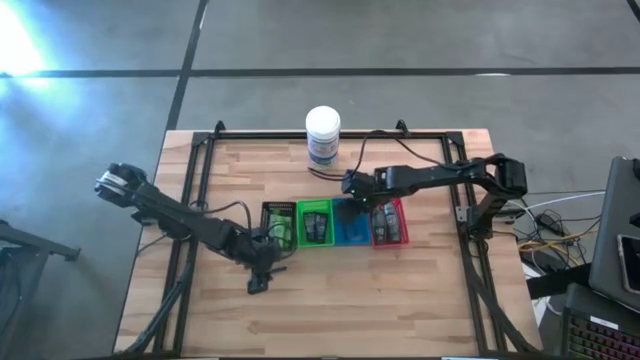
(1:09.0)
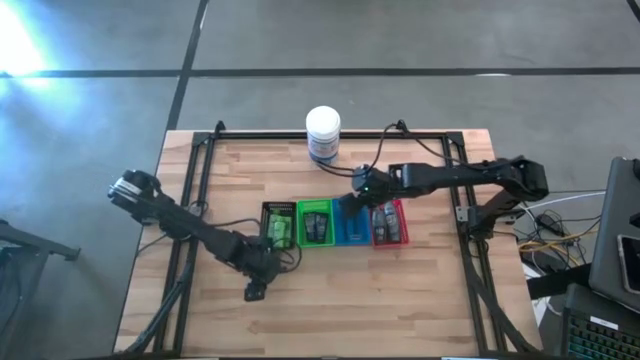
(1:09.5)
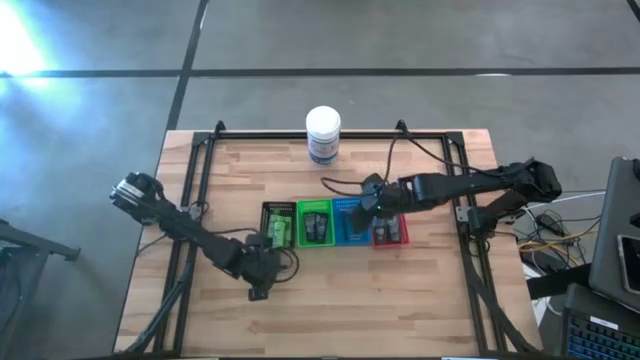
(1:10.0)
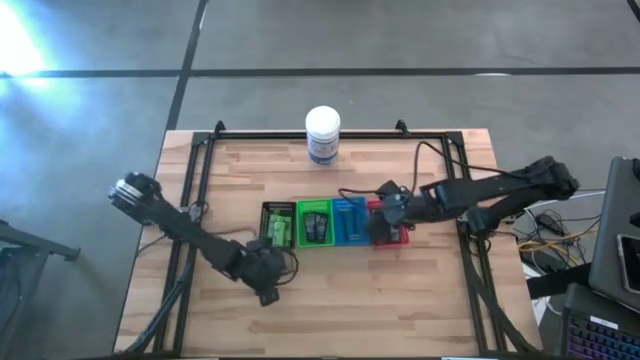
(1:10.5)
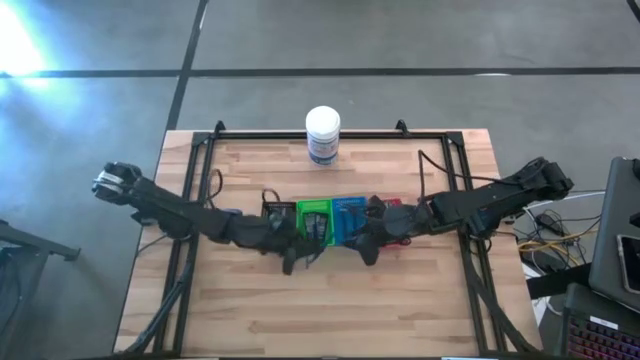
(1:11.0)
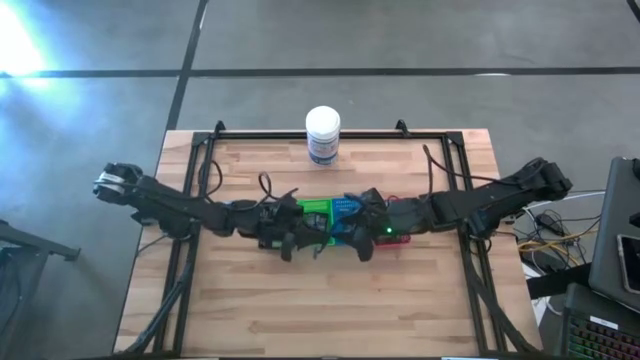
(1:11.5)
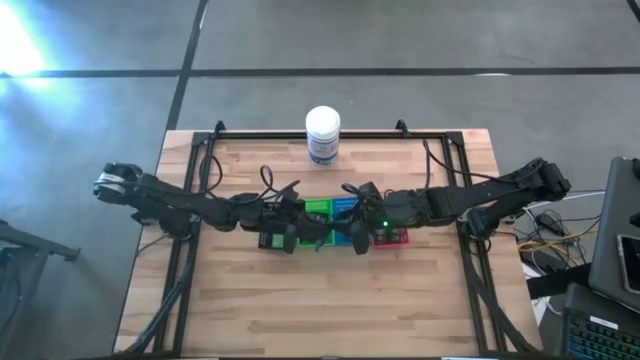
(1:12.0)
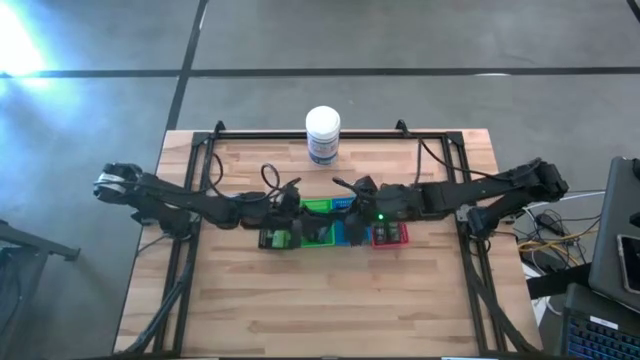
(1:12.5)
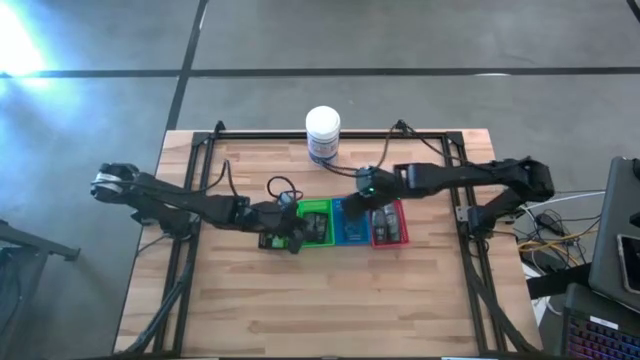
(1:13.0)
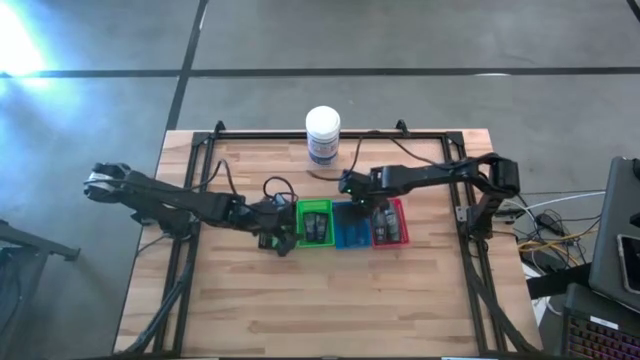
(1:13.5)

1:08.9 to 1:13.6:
Task: Pick & Place Travel size toiletries
Put the blue razor into the blue bin

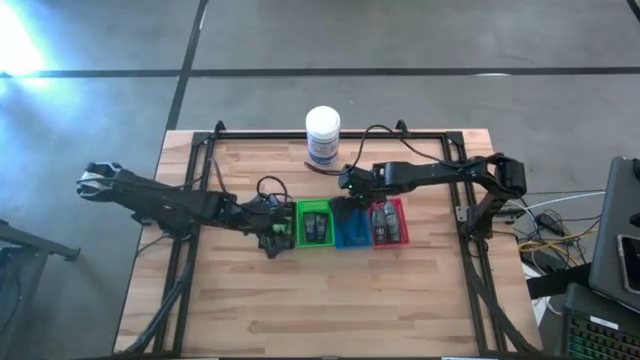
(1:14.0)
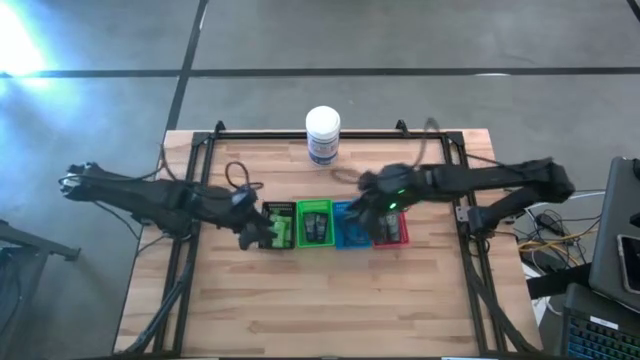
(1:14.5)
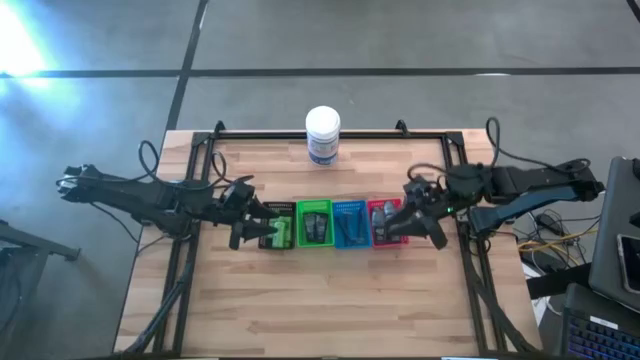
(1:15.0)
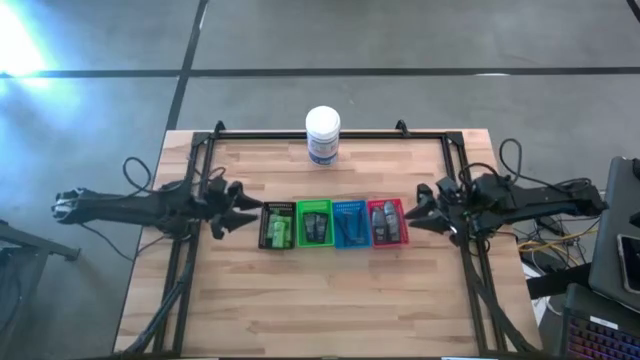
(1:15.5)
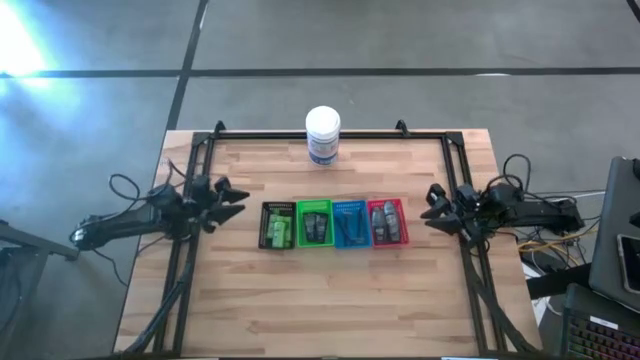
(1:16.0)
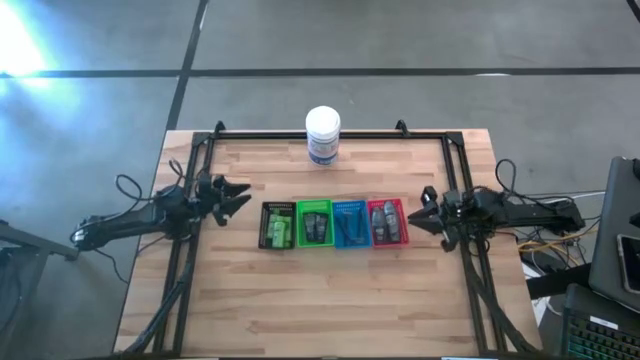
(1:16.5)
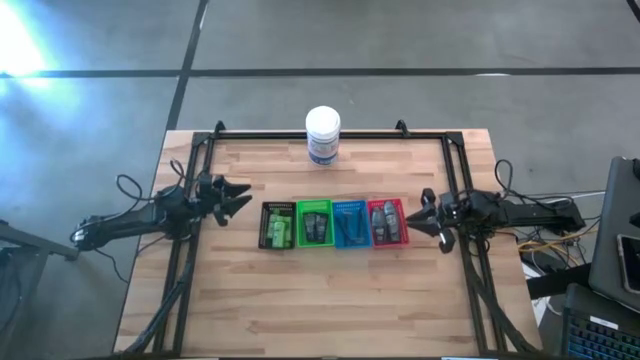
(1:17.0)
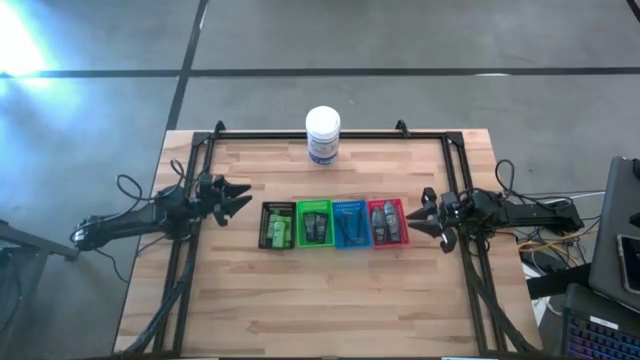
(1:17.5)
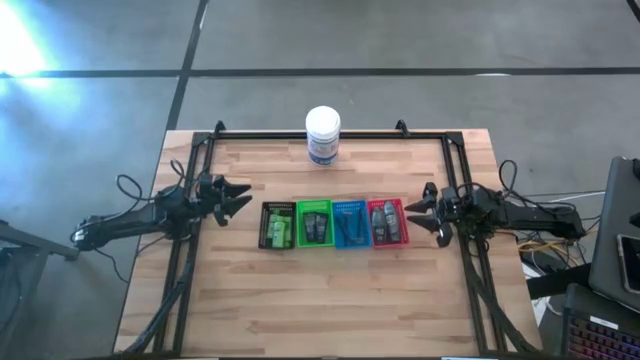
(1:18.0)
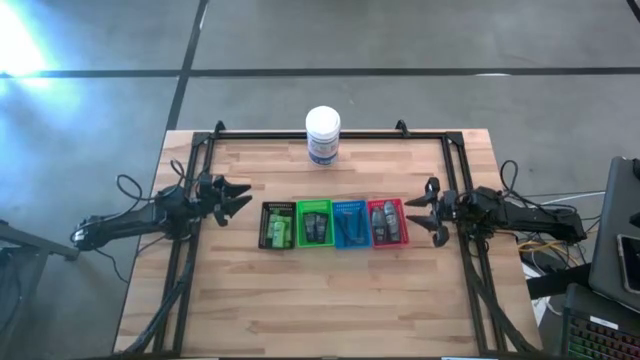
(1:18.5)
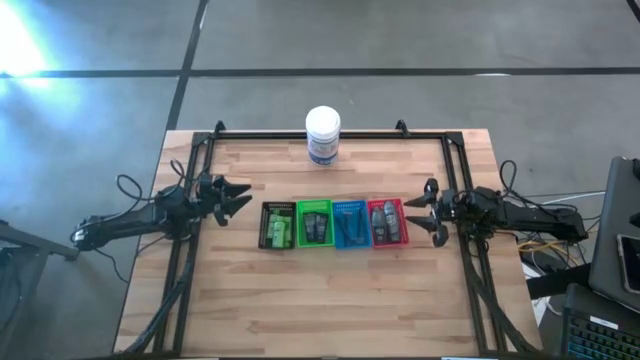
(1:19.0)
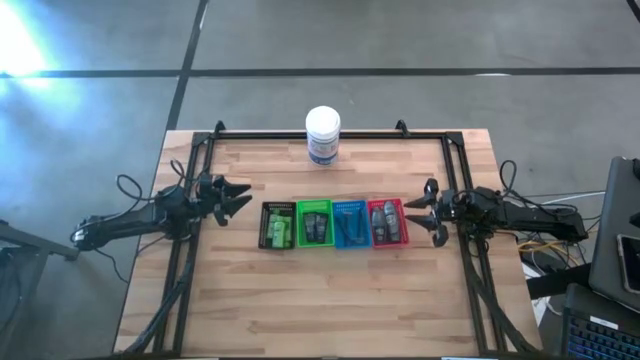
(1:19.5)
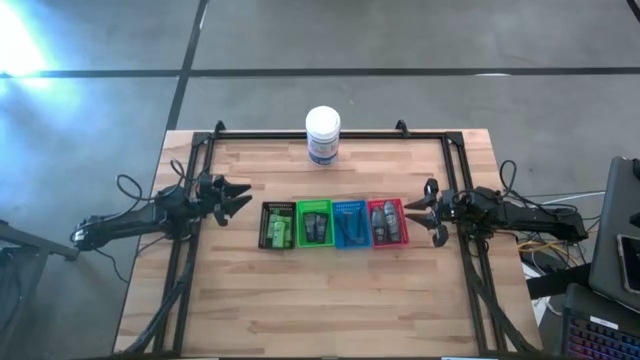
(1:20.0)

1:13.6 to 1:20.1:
Return to Home Position

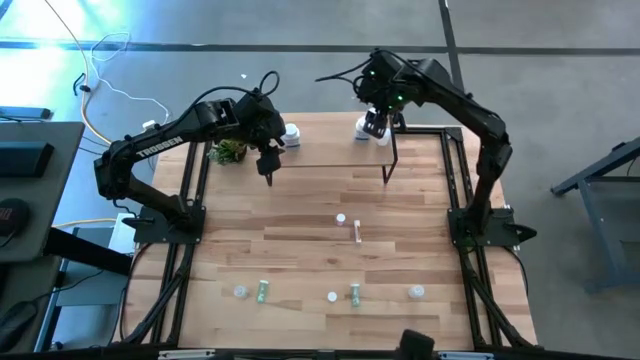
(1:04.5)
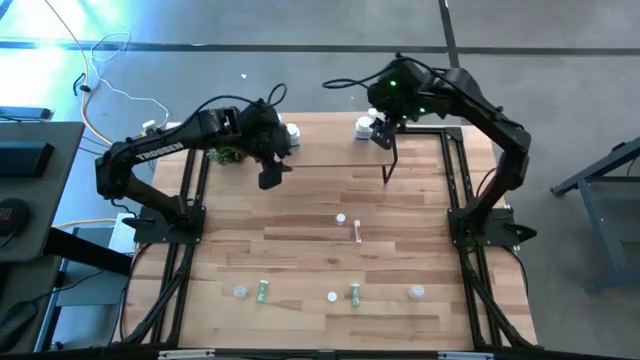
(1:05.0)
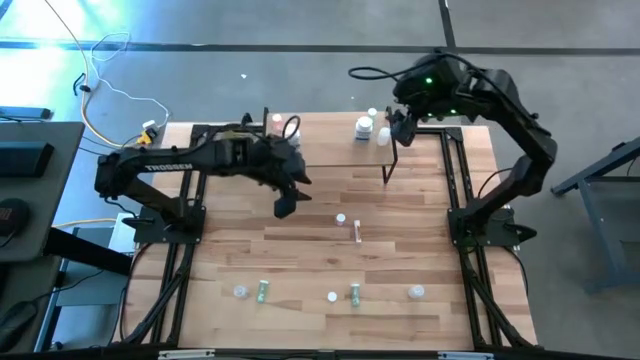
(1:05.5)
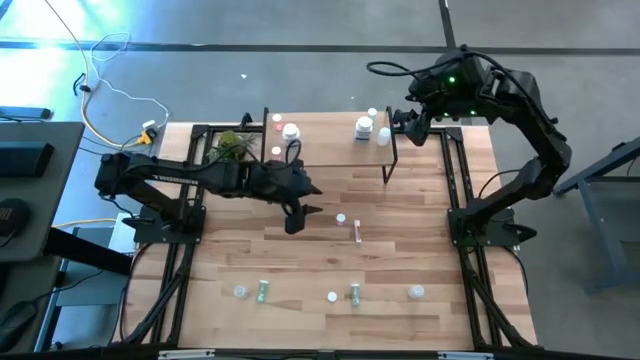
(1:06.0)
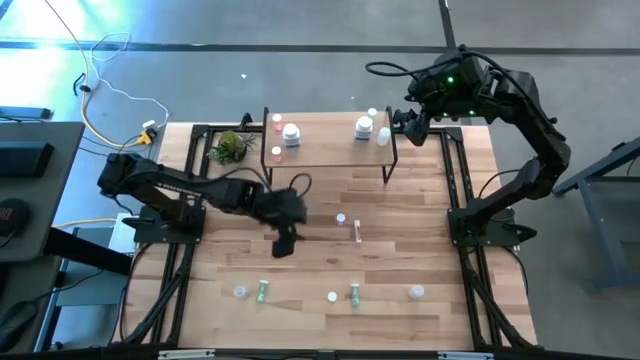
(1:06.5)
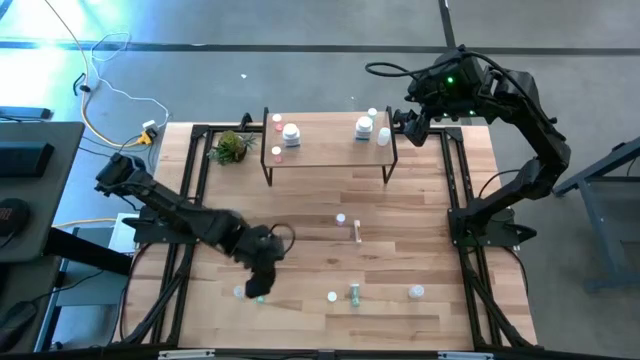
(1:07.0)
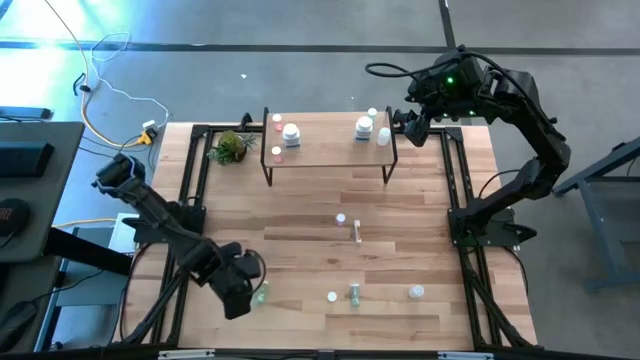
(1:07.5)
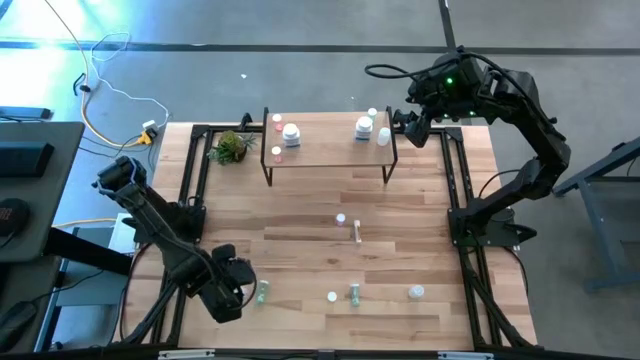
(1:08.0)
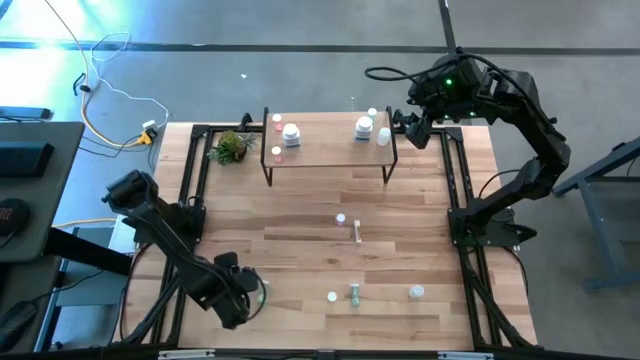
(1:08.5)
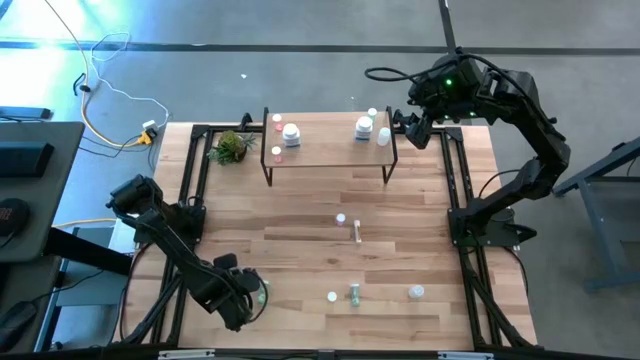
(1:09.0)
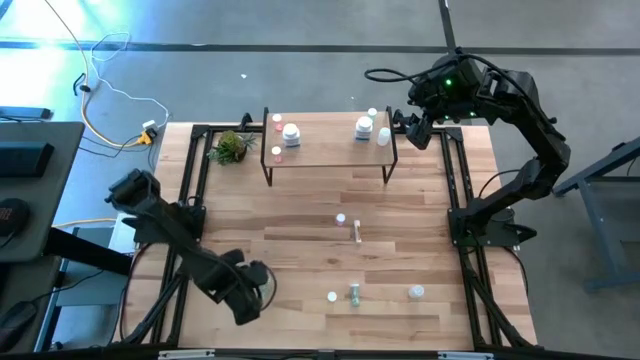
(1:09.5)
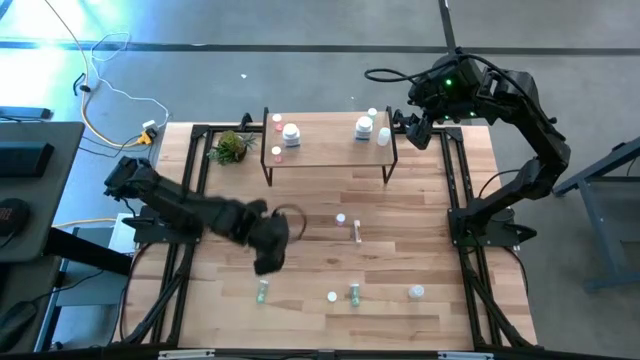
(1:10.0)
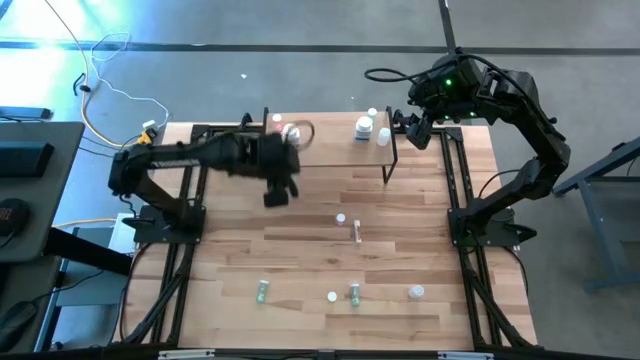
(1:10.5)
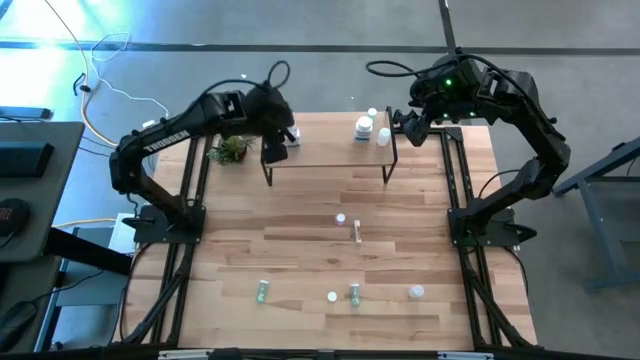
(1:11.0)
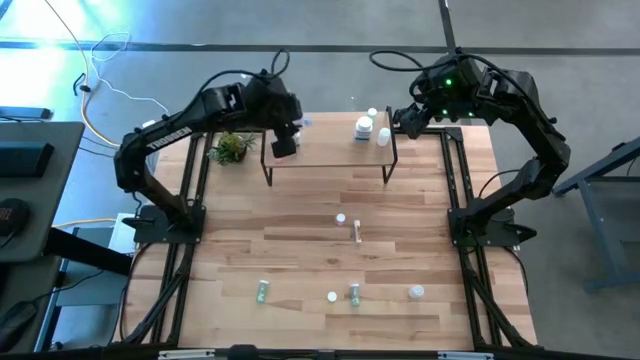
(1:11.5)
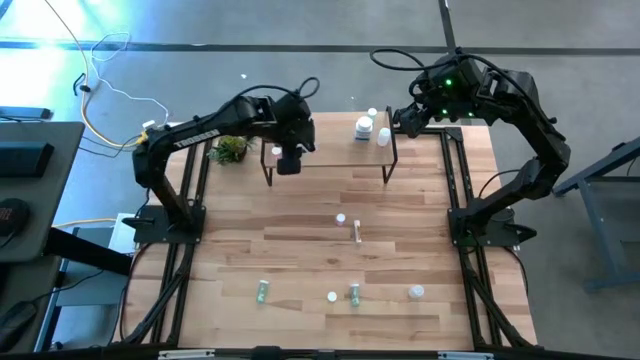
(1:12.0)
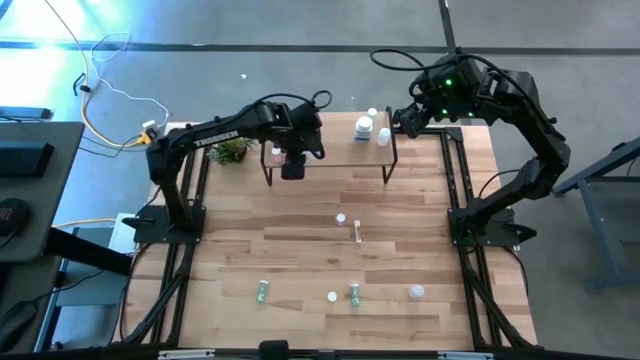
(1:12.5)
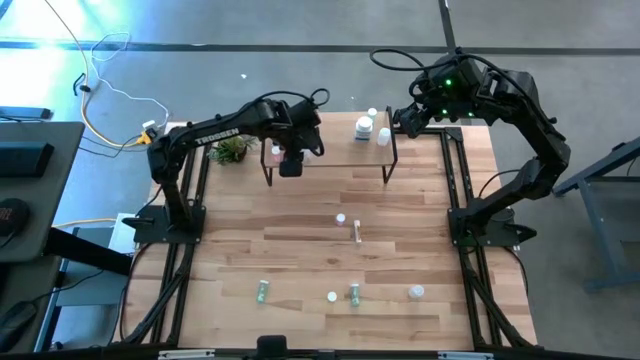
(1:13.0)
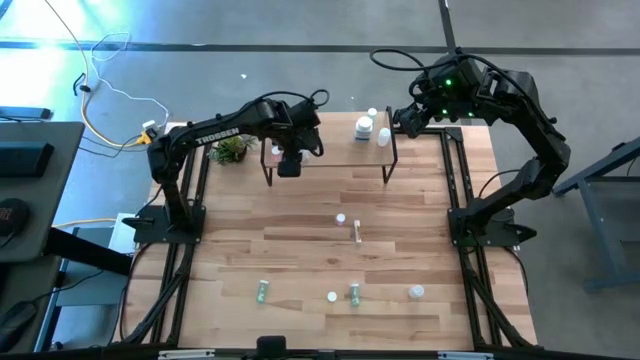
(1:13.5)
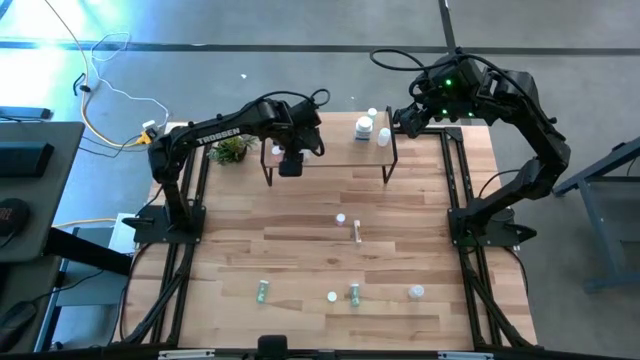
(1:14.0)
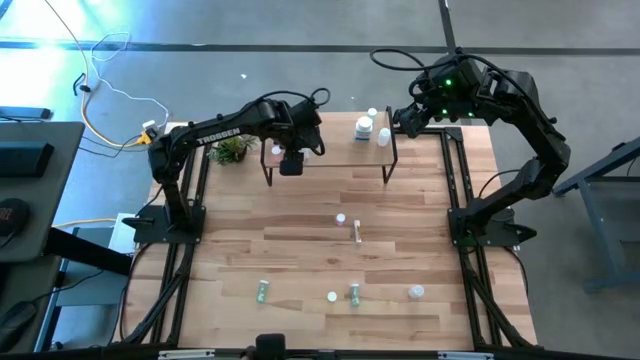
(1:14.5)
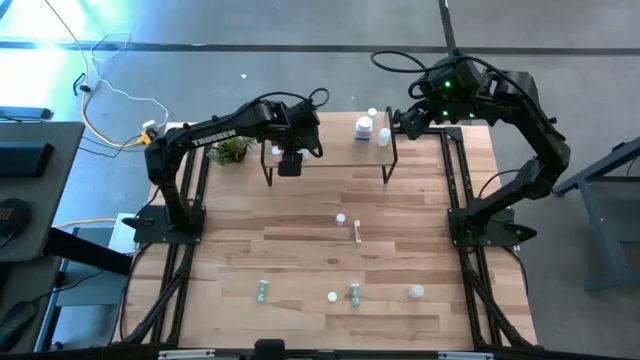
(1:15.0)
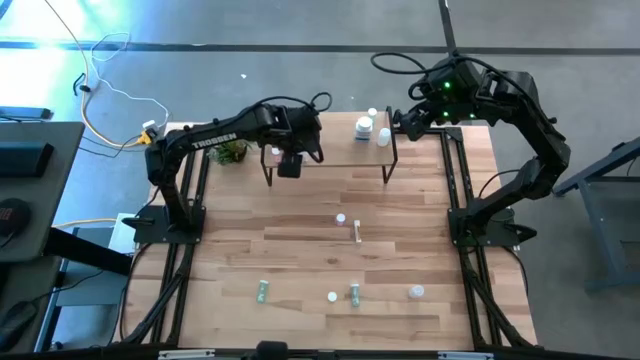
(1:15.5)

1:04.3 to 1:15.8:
Task: Pick and place medicine bottles onto shelf by color
Put the left transparent pill bottle on the shelf
